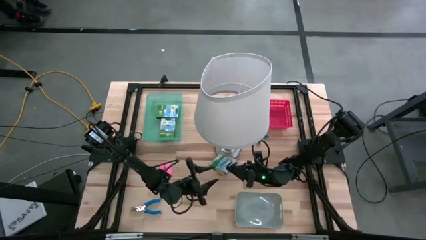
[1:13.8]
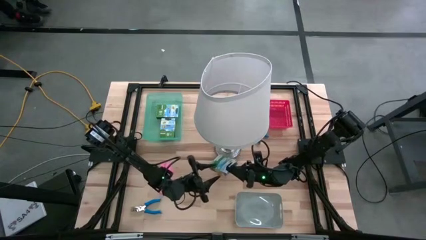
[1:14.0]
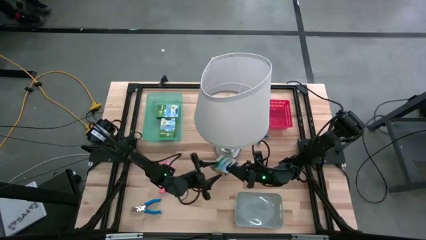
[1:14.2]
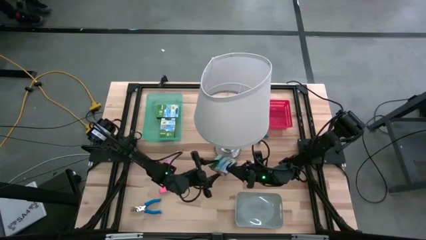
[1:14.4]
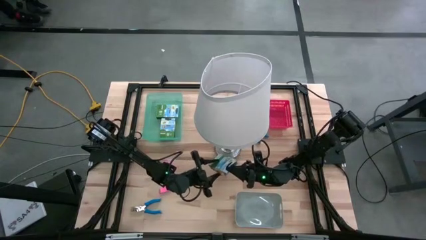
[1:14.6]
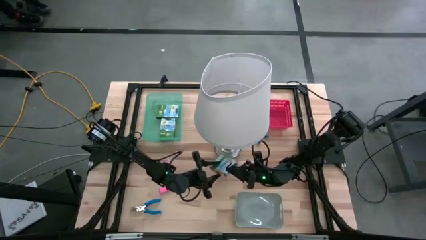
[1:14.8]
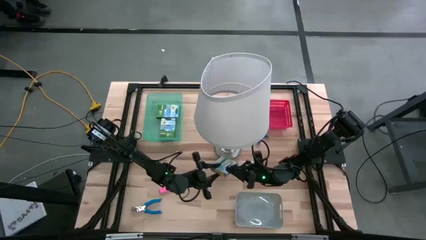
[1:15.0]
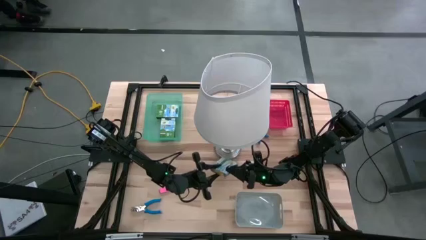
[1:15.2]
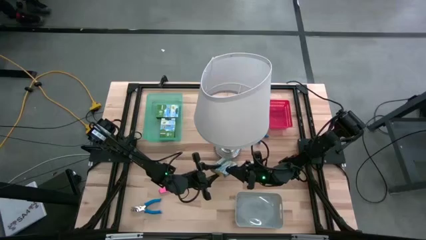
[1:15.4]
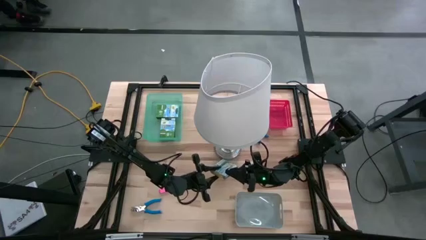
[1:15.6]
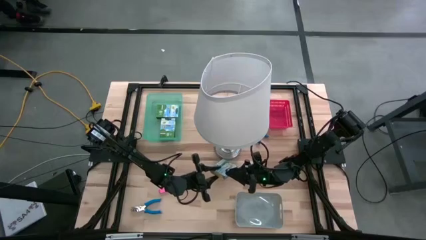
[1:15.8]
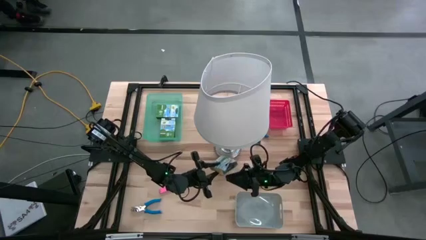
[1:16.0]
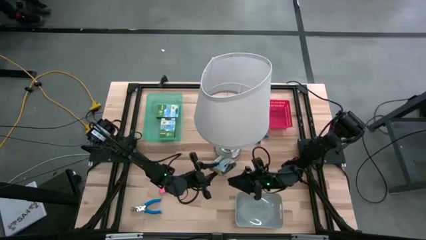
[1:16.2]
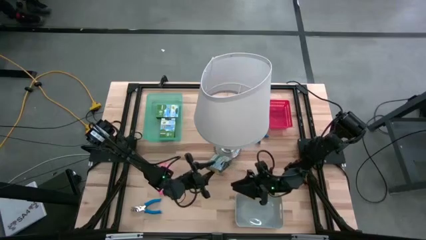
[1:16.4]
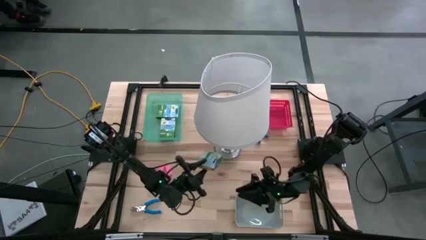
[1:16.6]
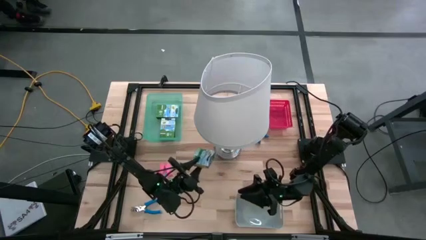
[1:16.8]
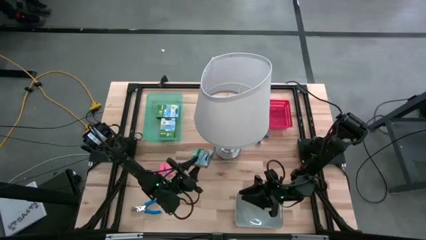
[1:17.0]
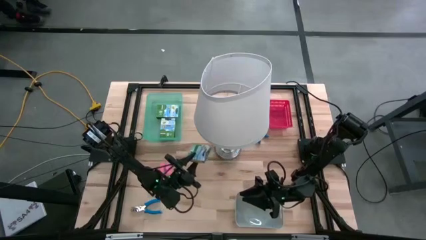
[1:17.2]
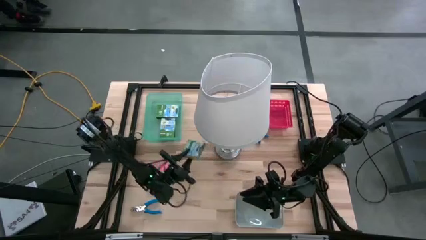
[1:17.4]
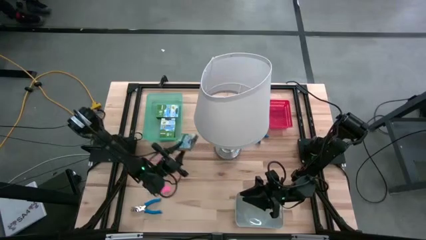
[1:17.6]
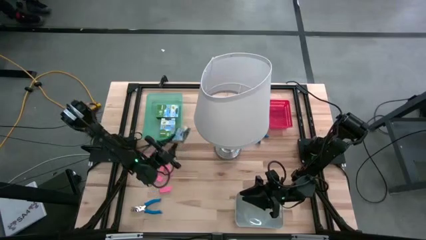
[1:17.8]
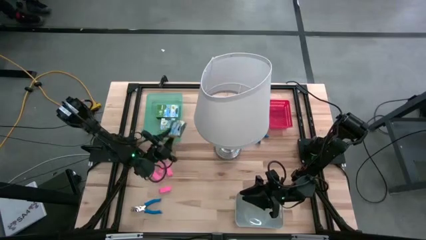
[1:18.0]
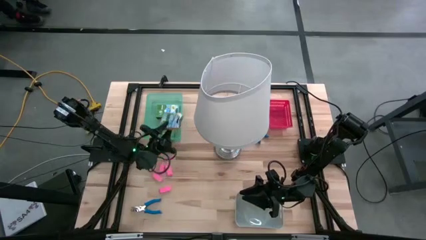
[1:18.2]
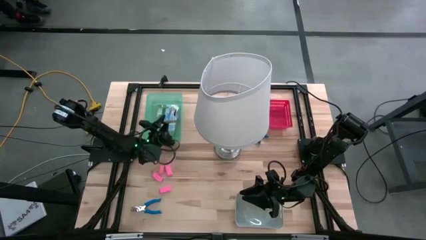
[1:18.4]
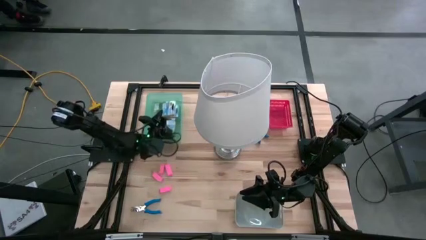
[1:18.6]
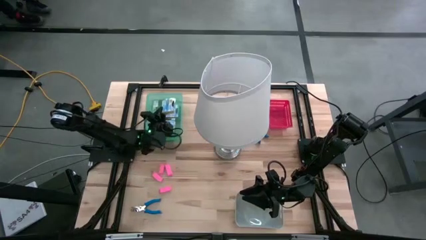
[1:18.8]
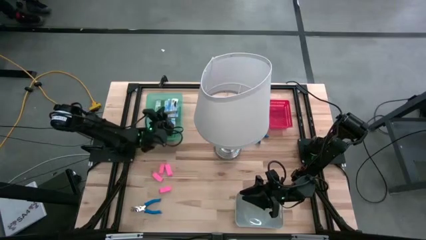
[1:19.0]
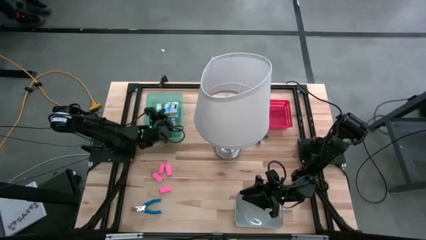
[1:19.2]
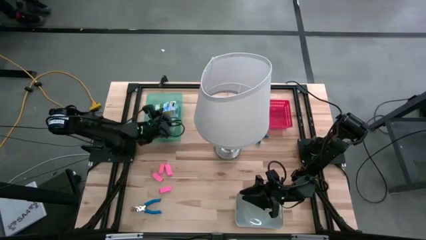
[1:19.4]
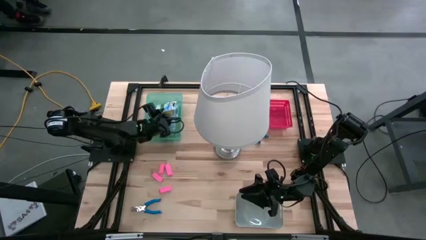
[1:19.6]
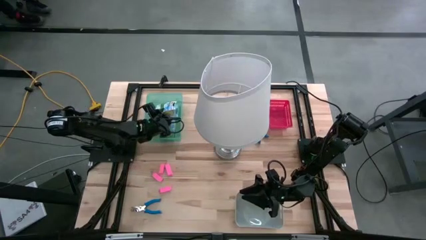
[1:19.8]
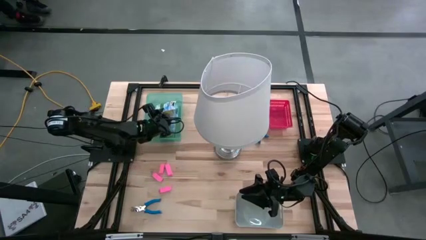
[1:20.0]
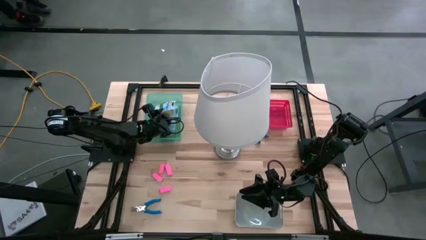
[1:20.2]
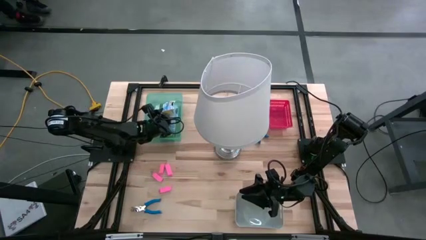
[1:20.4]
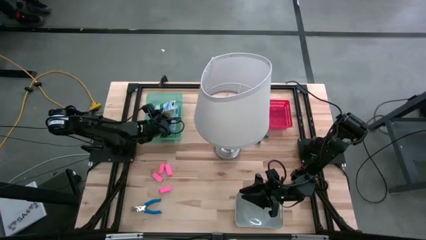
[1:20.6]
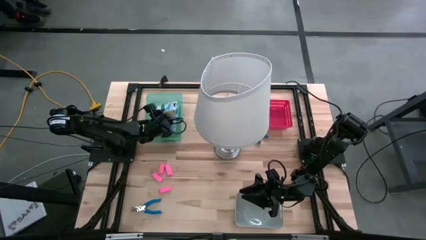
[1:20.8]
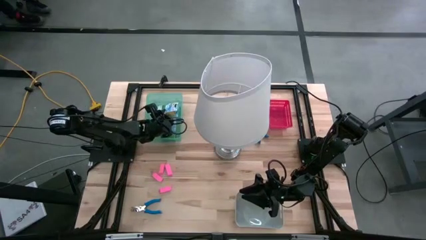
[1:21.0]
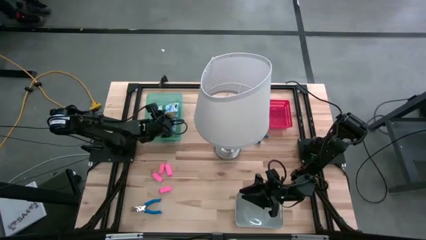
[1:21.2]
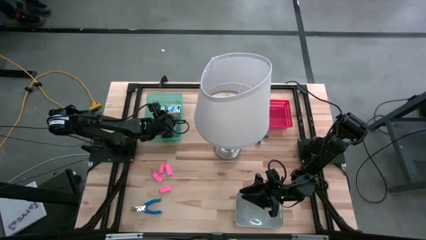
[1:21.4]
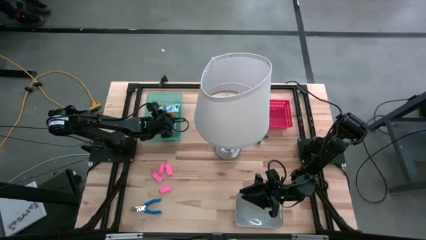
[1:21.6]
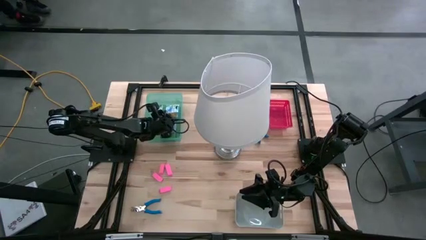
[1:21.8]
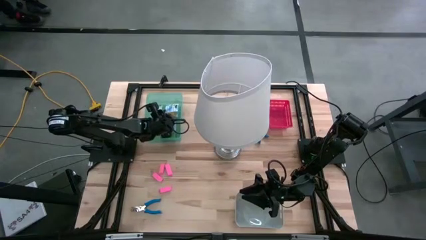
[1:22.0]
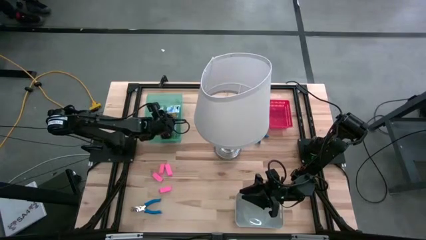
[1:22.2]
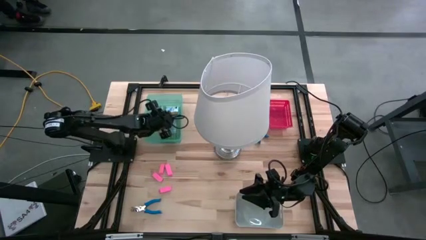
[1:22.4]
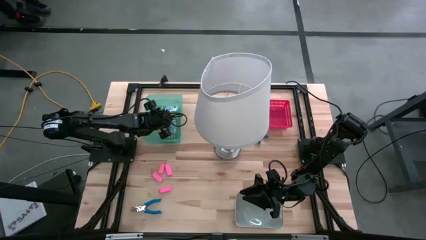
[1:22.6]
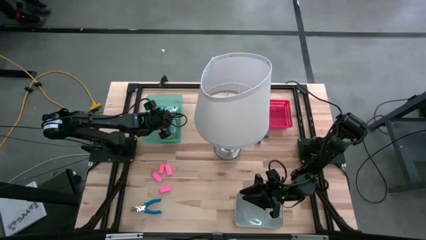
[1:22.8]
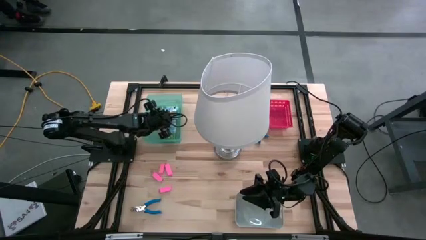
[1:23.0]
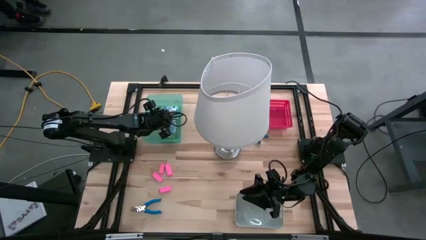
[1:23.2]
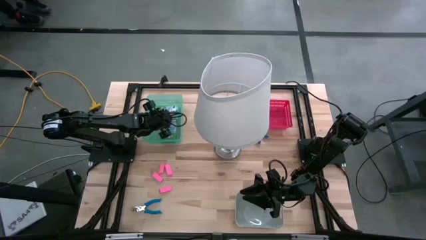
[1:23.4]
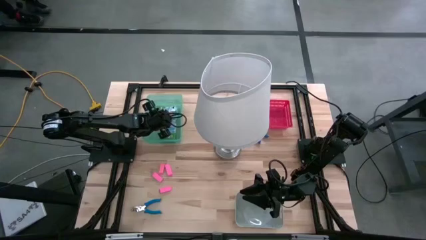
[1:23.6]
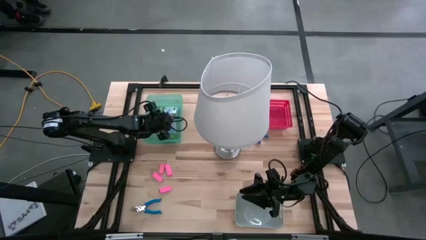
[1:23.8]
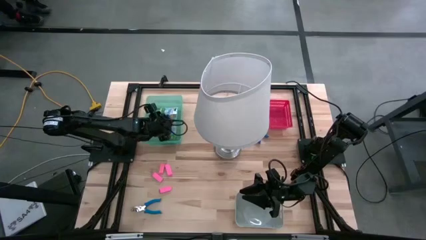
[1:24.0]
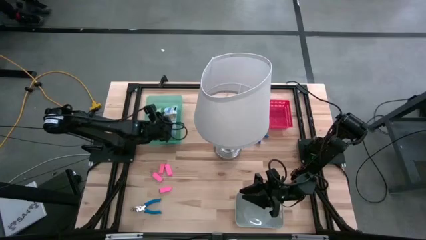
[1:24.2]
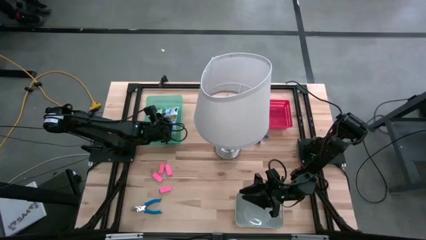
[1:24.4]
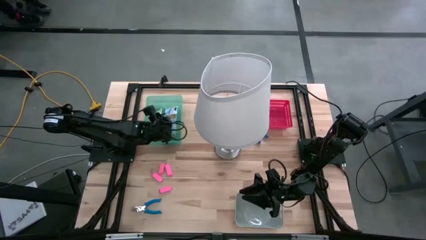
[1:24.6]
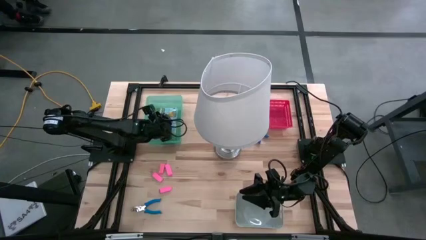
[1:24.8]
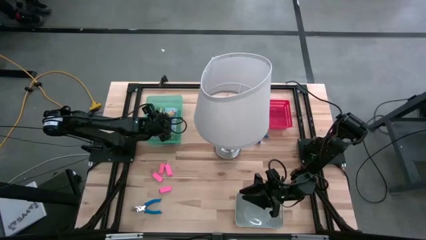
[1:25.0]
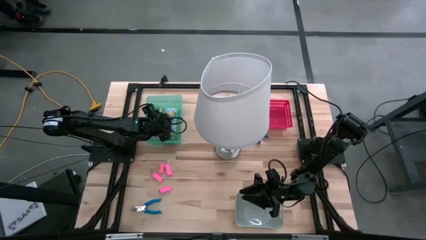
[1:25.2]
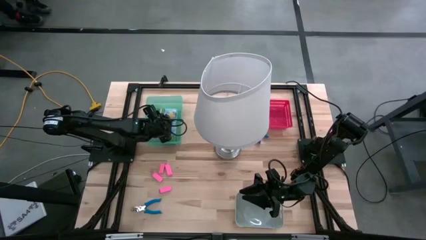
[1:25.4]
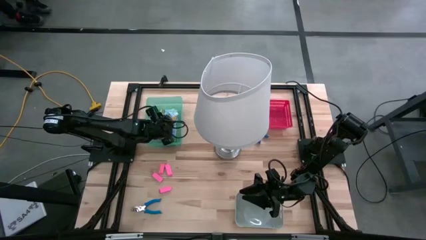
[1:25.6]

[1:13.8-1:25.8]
Task: Pick & Place School Supplies
Put the yellow crayon box into the green bin

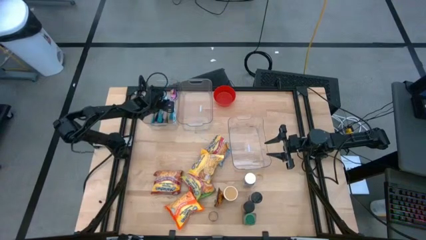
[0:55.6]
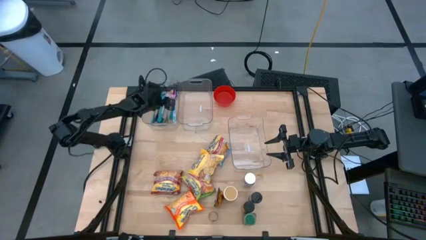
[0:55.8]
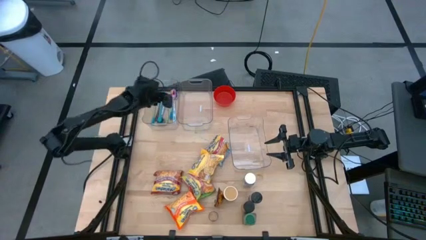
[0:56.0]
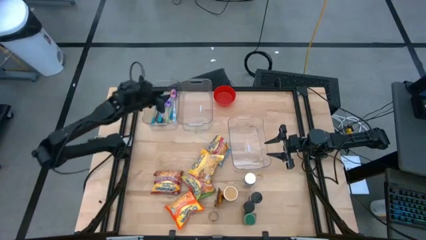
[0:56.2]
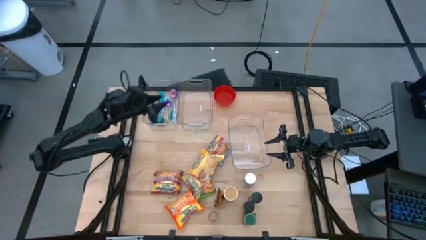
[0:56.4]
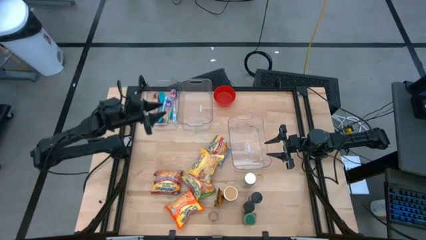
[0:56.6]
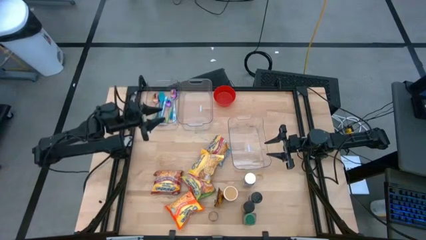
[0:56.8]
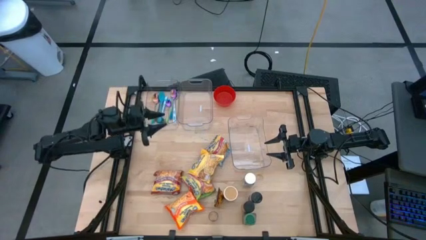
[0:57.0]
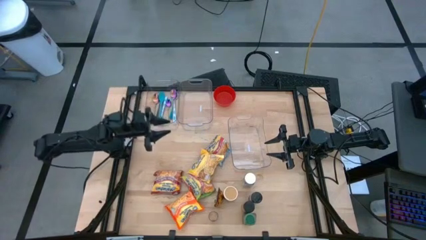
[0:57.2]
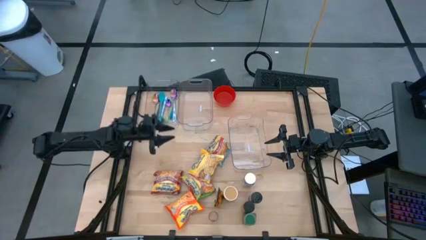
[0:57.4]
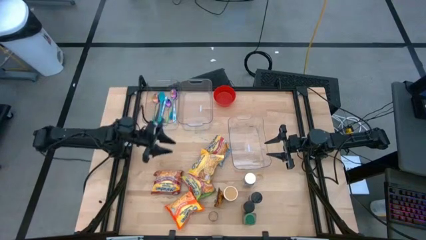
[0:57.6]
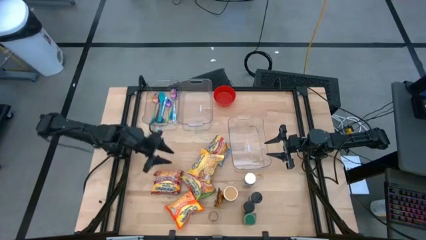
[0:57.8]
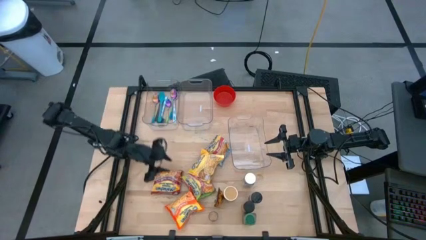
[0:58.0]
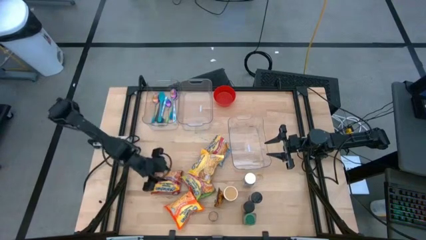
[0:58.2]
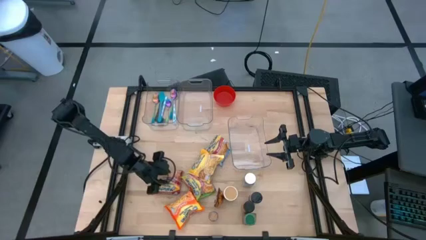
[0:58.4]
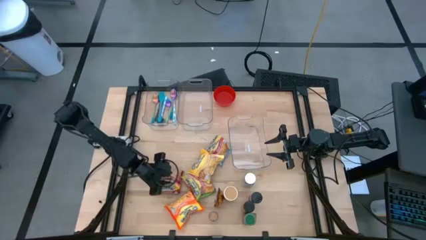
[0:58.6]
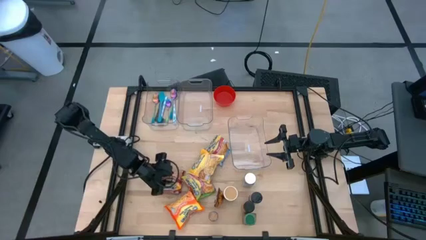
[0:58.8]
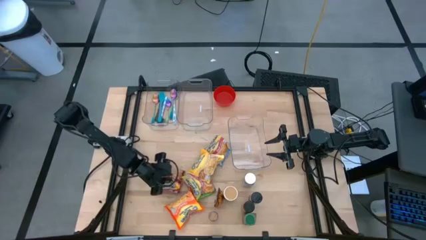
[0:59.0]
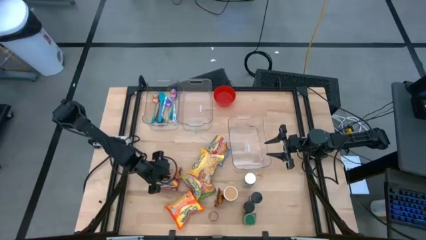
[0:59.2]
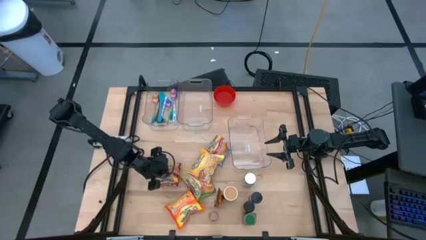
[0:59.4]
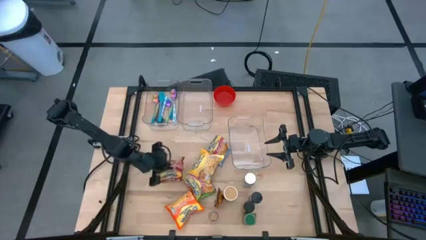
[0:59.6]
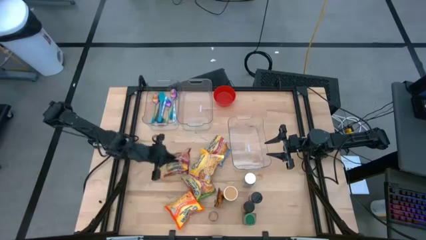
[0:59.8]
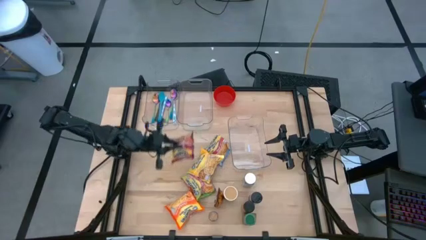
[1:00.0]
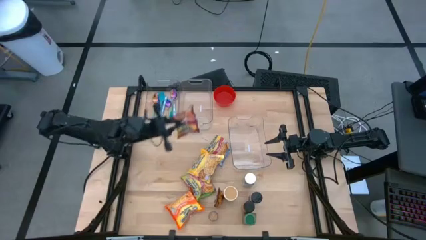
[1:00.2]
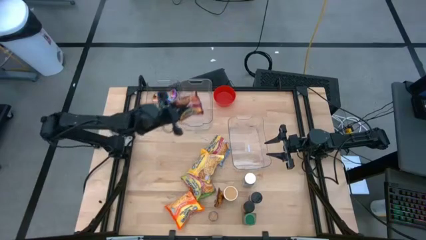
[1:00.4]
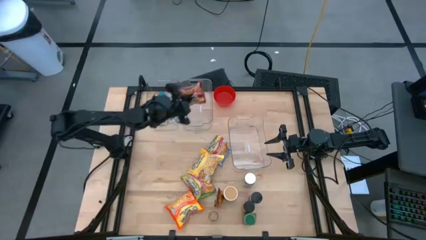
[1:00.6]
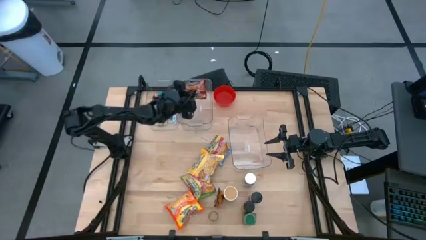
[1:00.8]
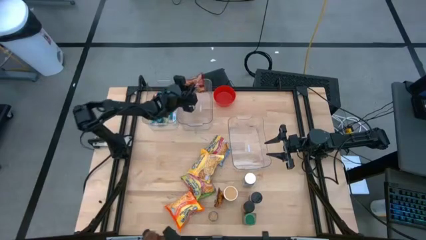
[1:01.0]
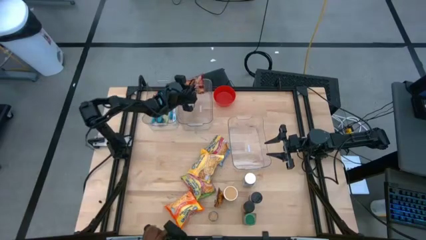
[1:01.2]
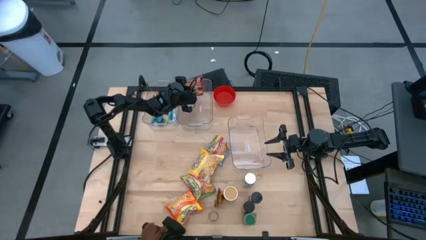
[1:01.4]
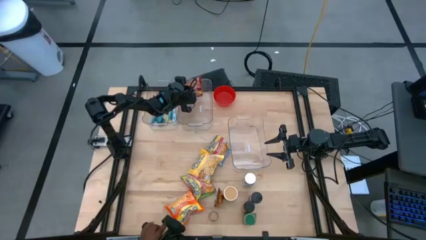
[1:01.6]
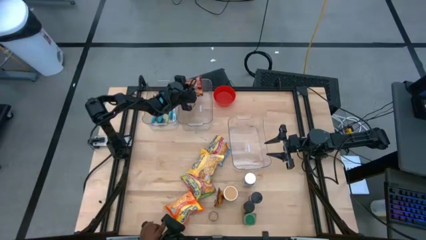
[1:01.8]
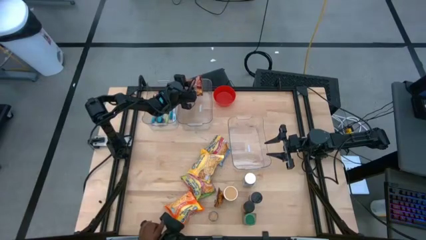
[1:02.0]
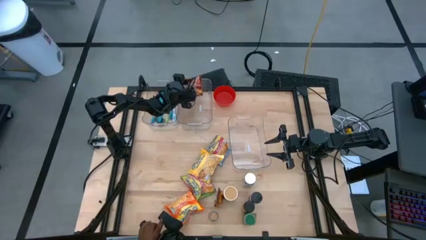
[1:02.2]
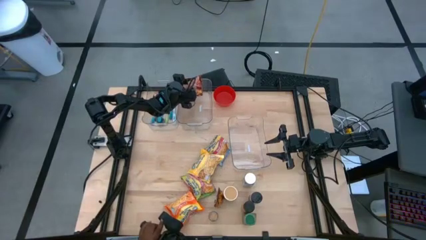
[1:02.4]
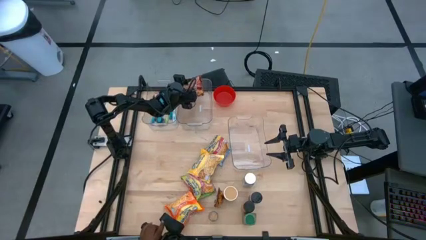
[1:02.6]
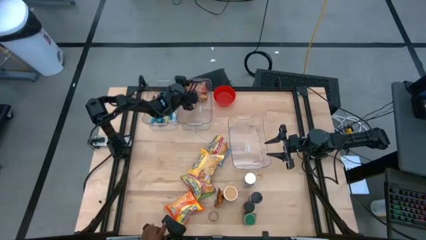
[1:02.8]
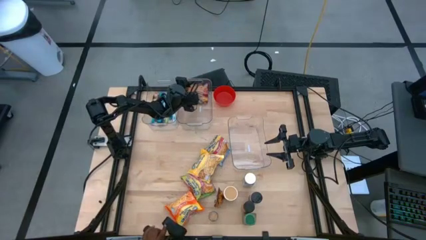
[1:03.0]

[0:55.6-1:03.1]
Task: Pick & Place Food Item
Put the red noodle pack into the top right transparent bin
